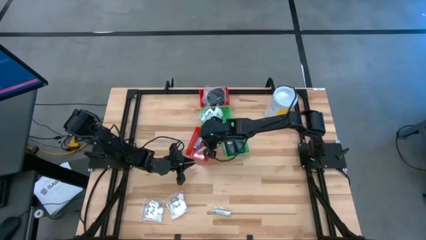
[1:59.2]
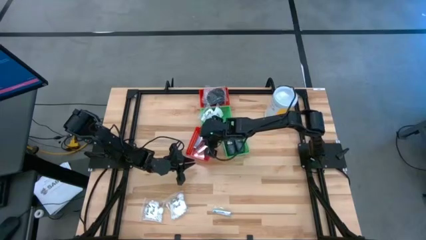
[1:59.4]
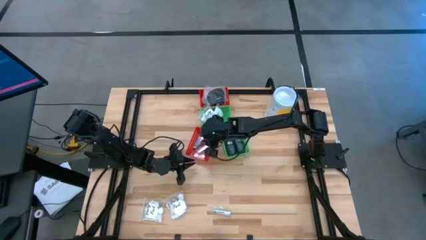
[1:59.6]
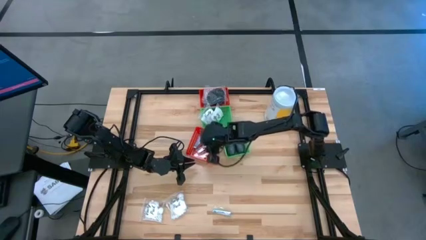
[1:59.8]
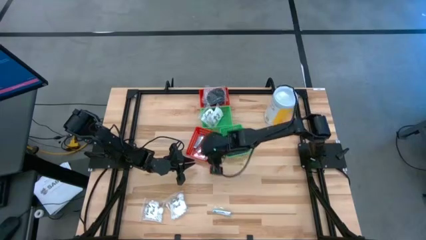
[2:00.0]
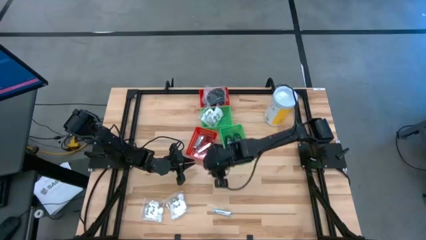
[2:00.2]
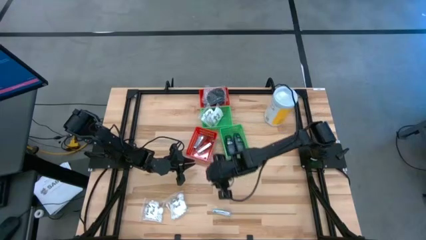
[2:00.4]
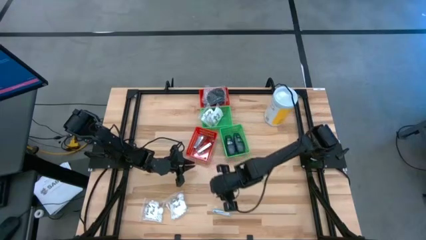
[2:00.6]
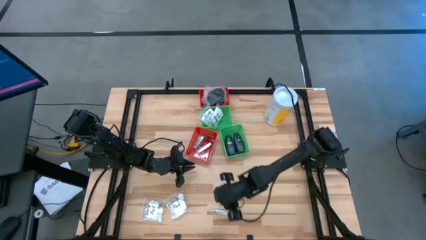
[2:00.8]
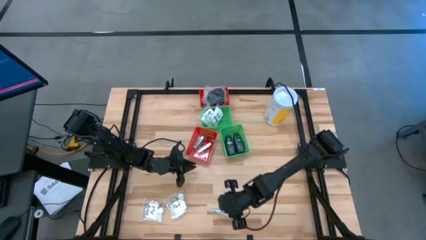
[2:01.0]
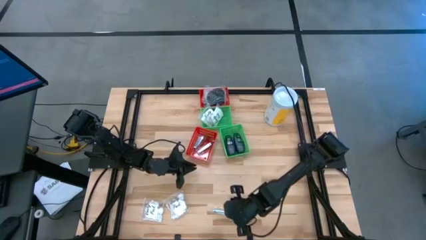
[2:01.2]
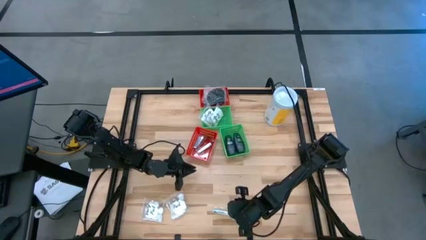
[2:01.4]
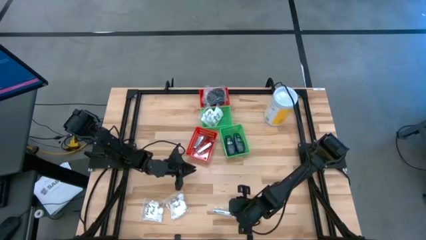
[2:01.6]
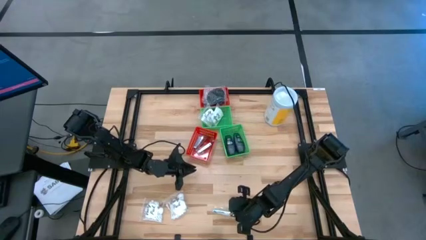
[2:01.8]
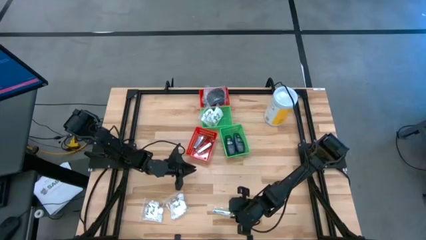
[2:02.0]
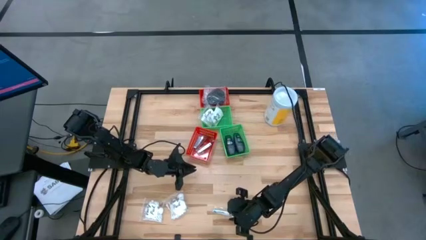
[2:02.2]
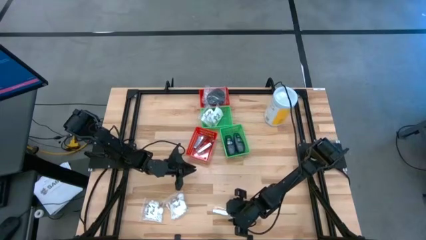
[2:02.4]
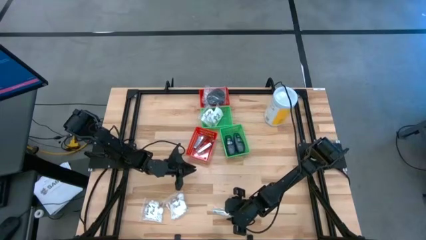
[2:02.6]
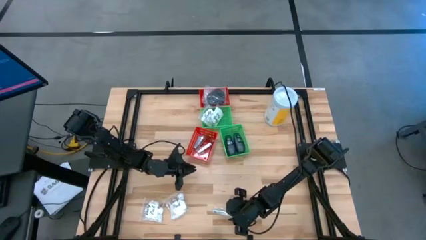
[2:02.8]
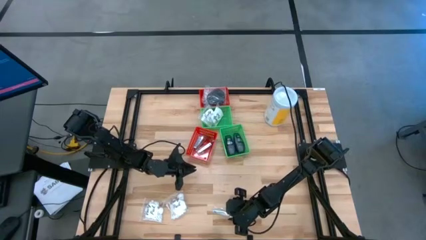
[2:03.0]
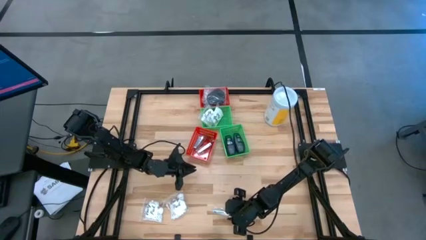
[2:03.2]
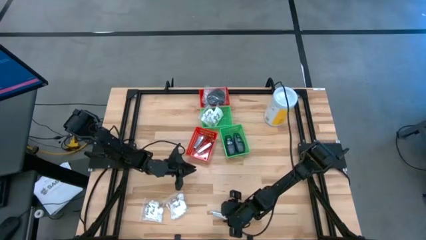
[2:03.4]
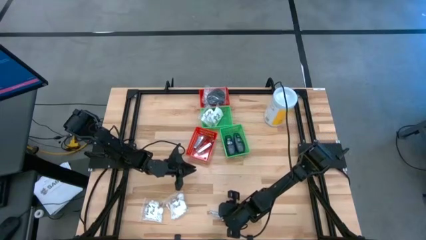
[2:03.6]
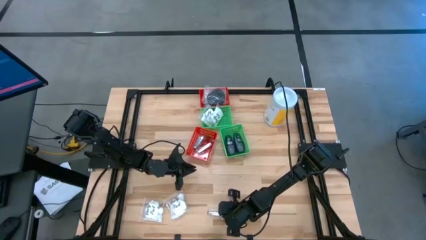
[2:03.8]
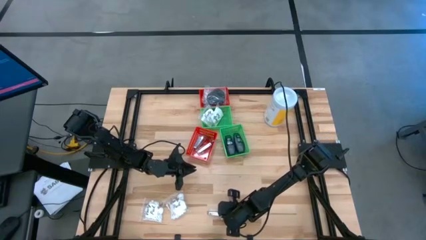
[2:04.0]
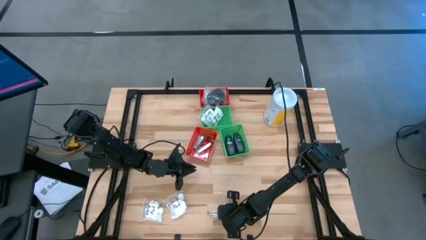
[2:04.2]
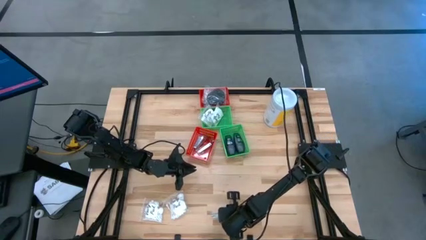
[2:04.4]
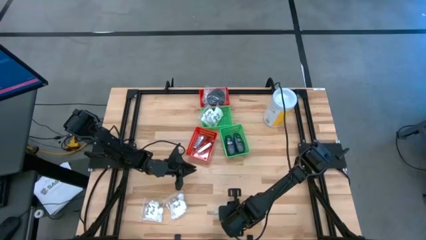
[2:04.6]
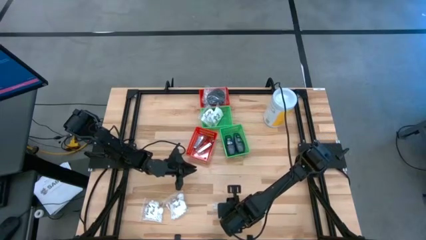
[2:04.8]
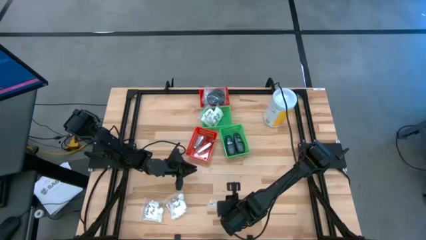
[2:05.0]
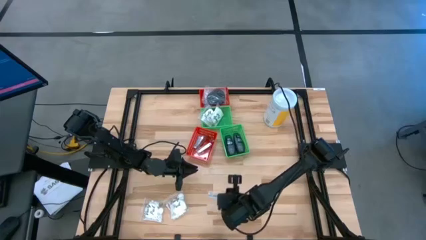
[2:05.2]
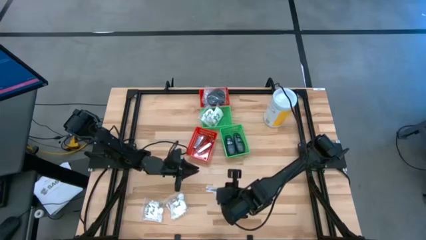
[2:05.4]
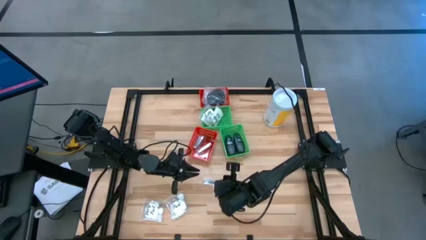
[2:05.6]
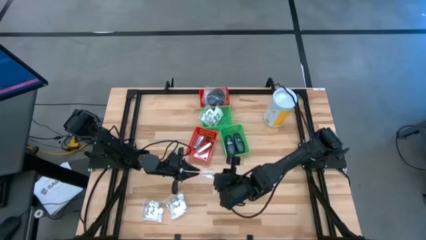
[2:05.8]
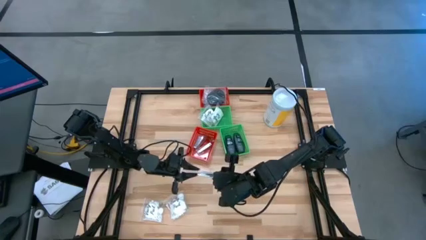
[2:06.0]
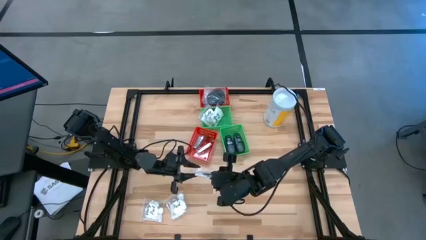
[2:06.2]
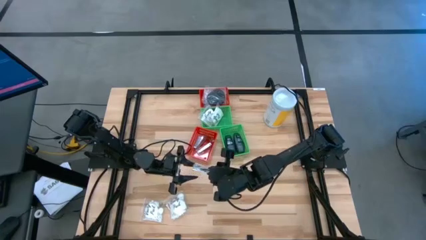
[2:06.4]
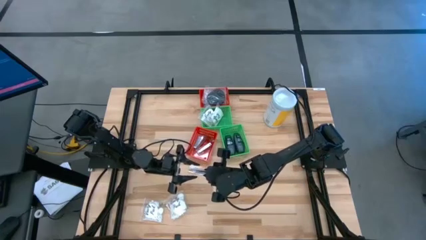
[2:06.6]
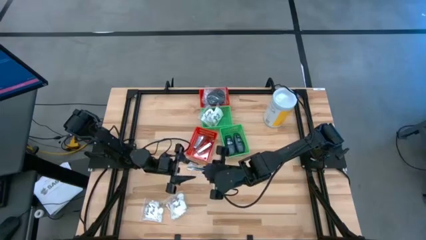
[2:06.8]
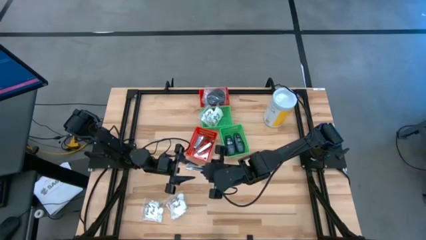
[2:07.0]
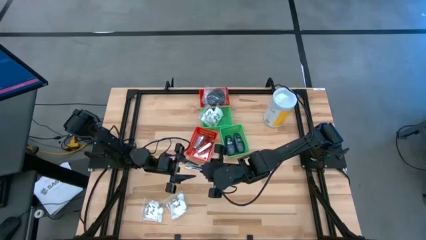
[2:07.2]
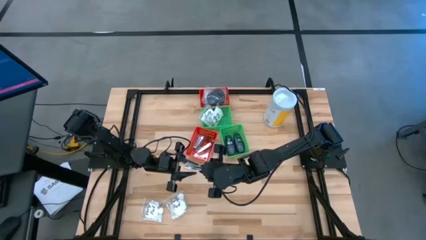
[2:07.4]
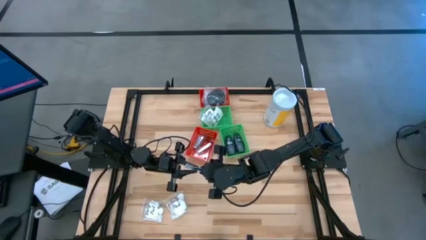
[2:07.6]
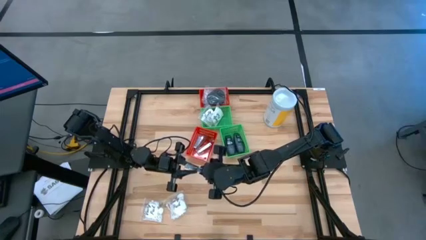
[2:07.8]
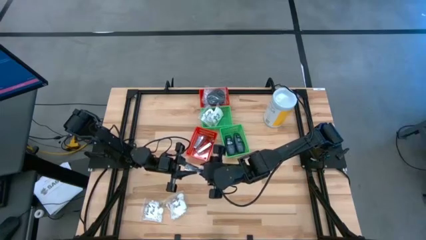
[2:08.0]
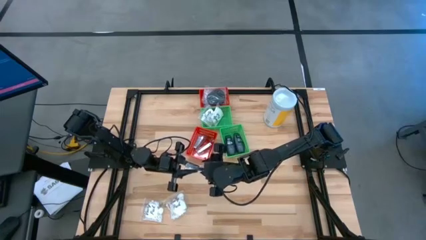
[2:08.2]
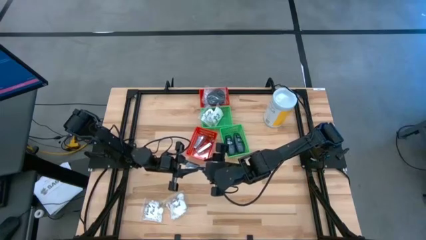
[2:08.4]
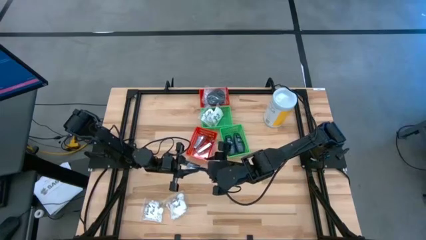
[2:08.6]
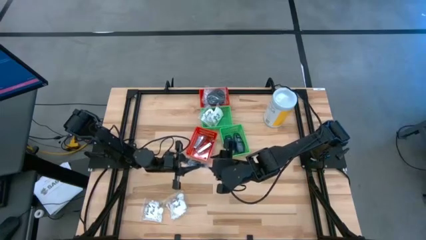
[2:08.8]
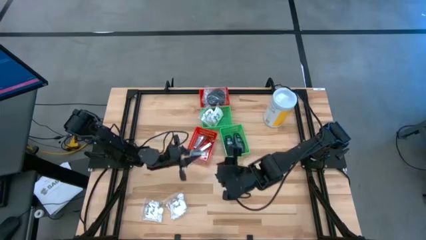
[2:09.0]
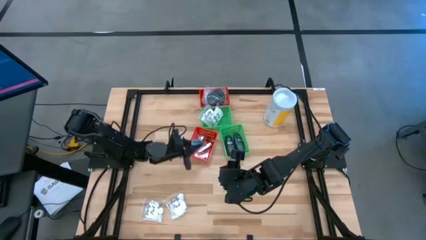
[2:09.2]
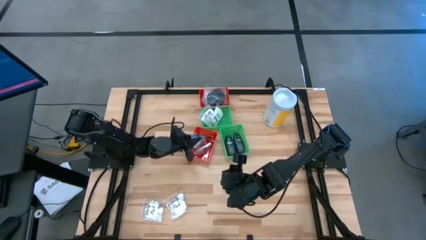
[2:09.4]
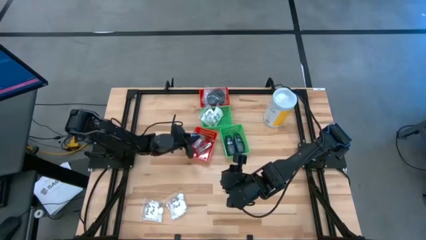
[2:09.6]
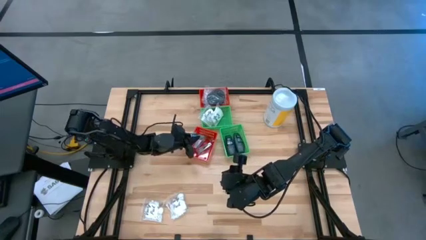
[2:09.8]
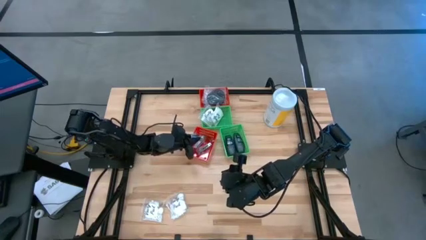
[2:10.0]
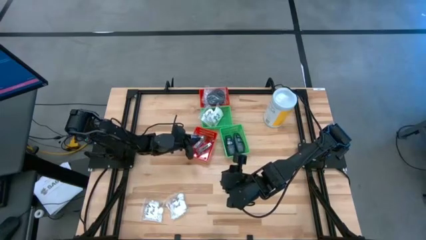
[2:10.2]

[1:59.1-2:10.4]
Task: Pick & Place Travel size toiletries
Put the silver nail cutter into the bottom red bin

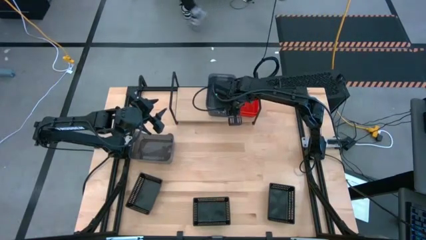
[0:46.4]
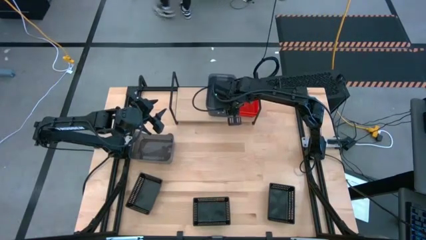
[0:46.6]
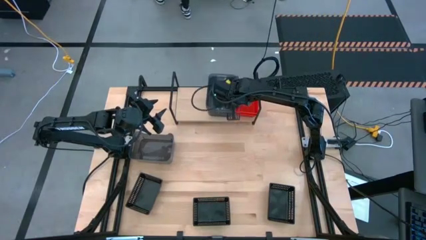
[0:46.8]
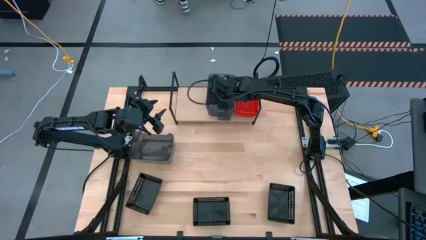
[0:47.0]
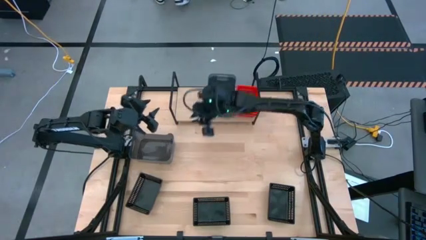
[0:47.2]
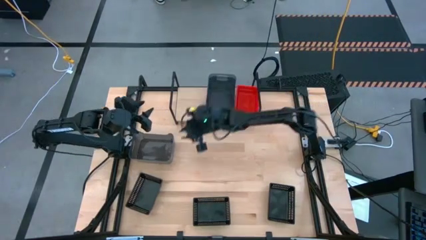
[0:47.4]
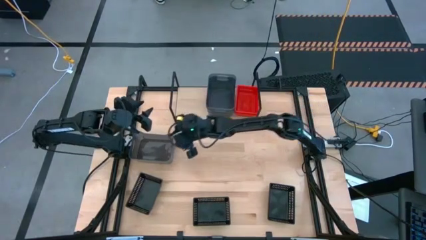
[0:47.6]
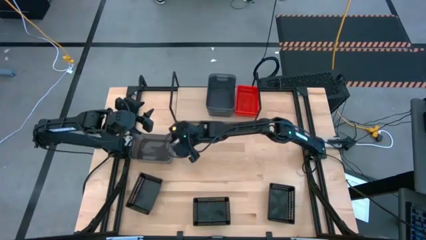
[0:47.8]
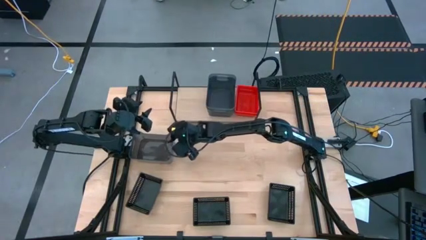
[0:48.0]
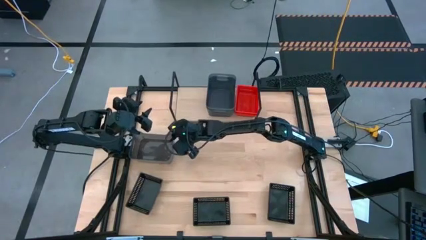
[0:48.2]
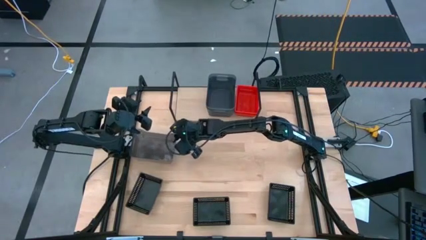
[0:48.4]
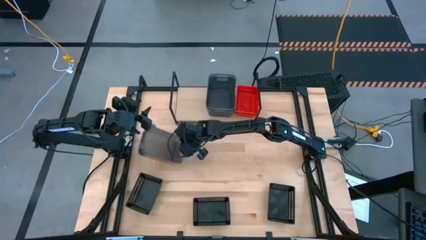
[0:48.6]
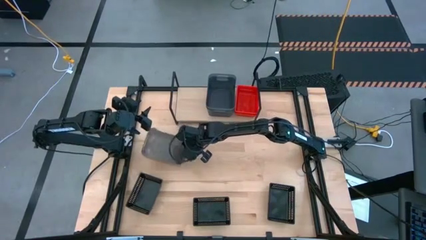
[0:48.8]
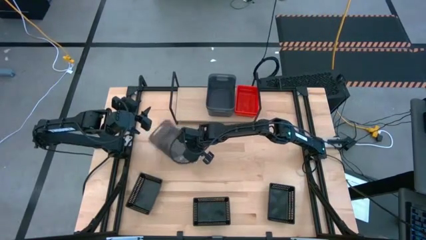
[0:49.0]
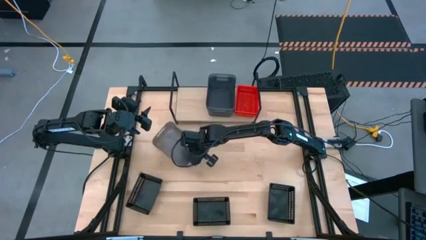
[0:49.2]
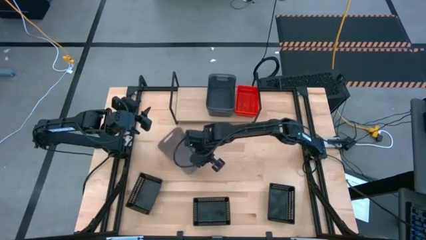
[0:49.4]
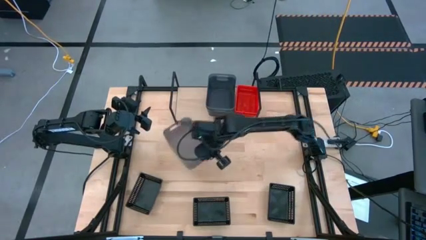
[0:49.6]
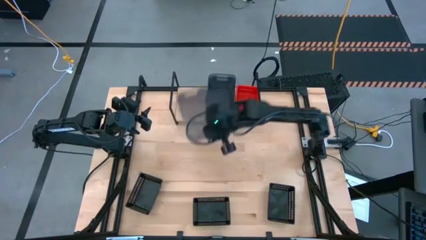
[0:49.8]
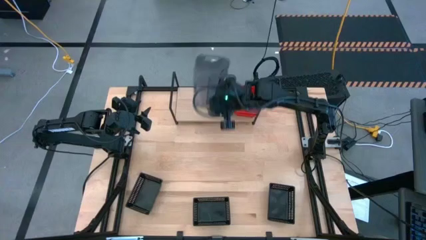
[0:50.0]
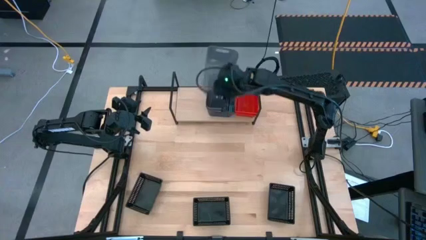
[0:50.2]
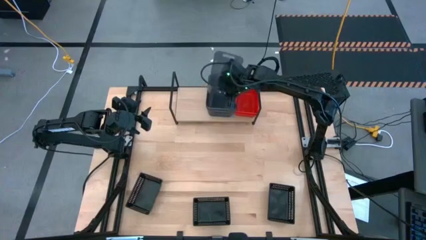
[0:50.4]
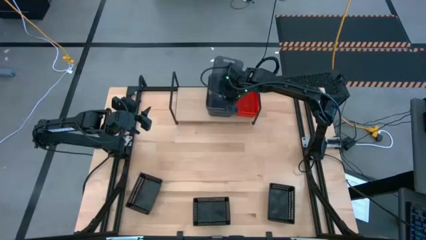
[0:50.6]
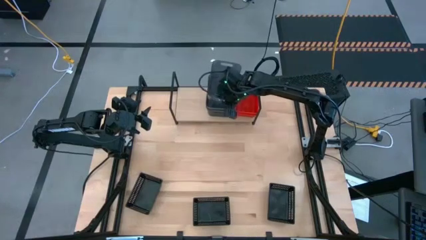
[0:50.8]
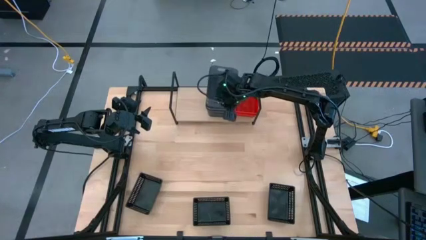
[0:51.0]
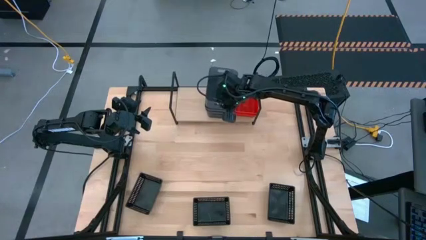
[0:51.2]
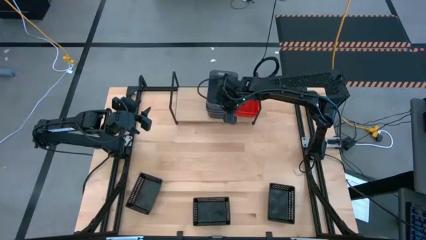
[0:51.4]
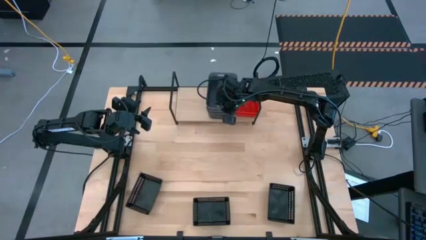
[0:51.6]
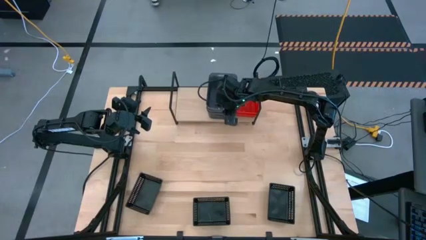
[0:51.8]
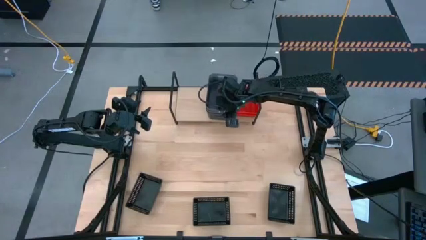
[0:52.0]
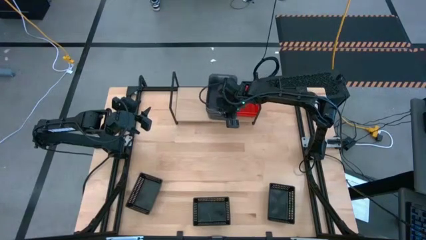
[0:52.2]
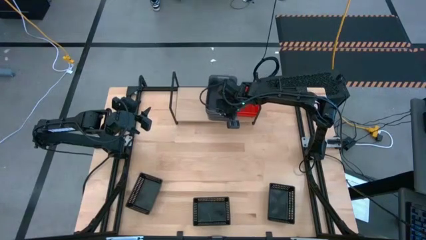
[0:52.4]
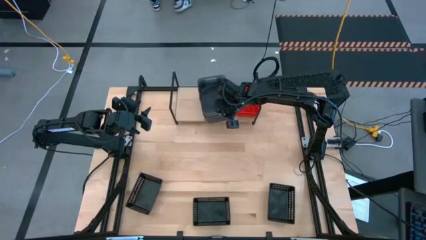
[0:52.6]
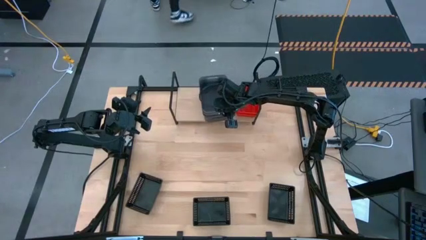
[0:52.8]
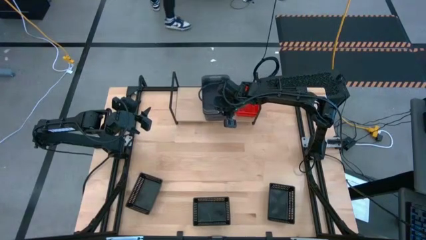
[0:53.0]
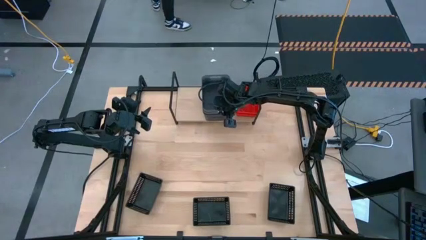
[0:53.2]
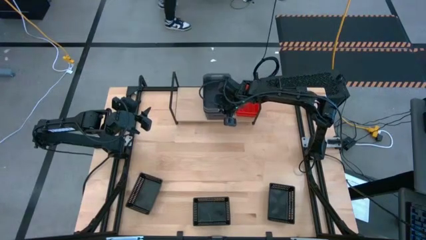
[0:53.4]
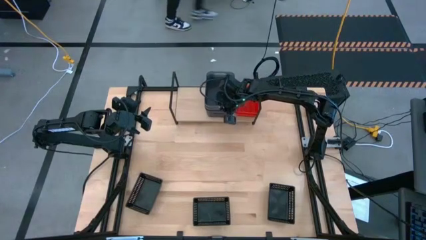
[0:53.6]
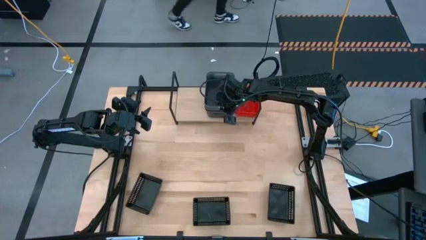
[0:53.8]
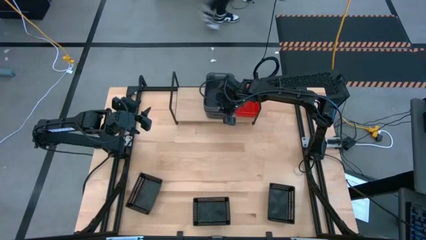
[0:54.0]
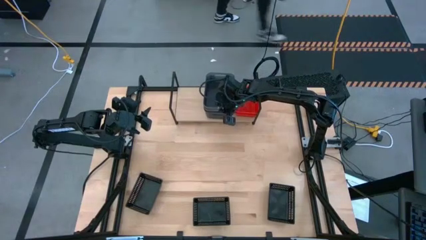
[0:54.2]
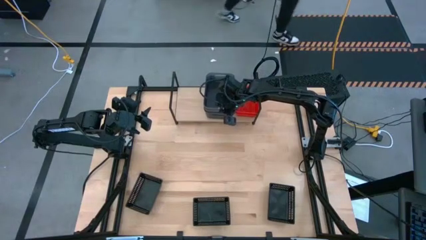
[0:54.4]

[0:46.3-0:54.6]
Task: Stack baskets on shelf by color
Stack the light black bin on top of the other light black bins on the shelf
